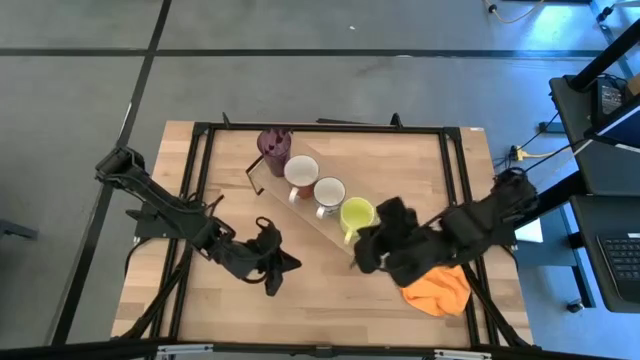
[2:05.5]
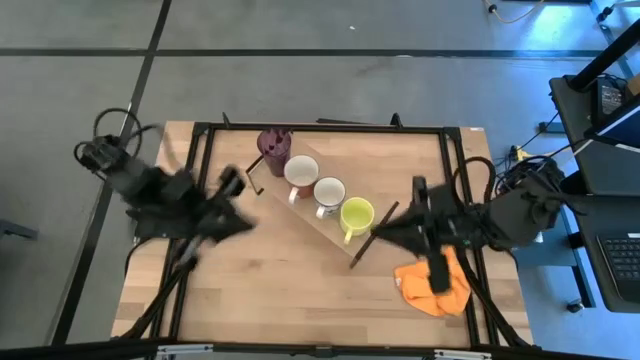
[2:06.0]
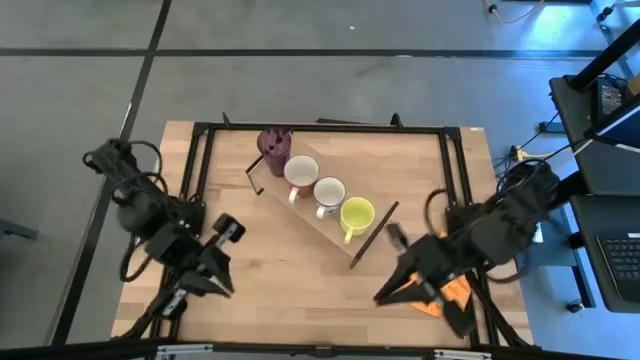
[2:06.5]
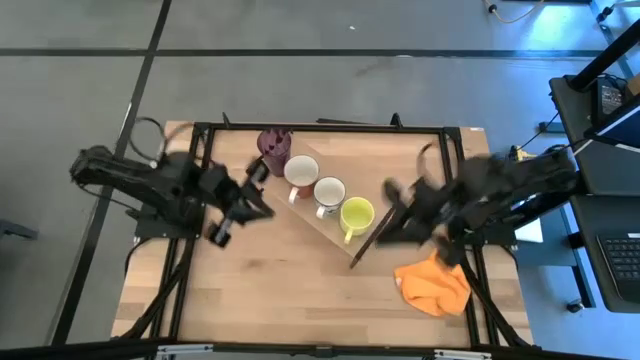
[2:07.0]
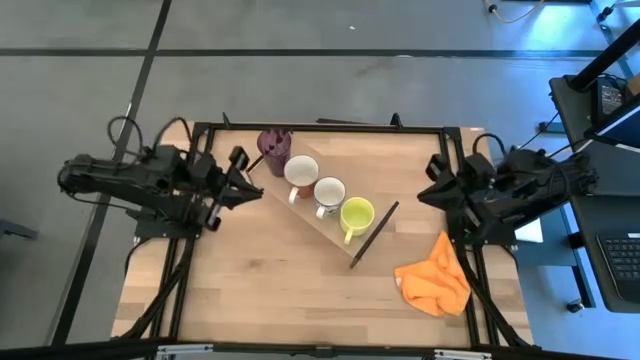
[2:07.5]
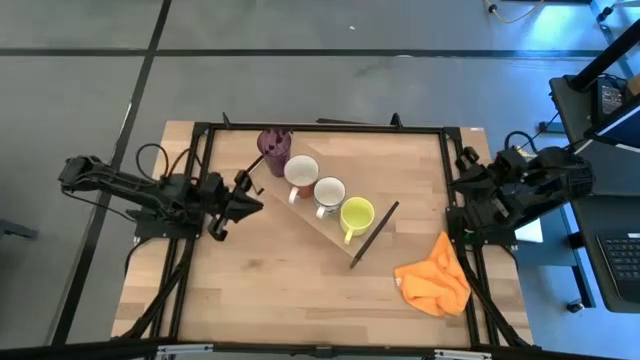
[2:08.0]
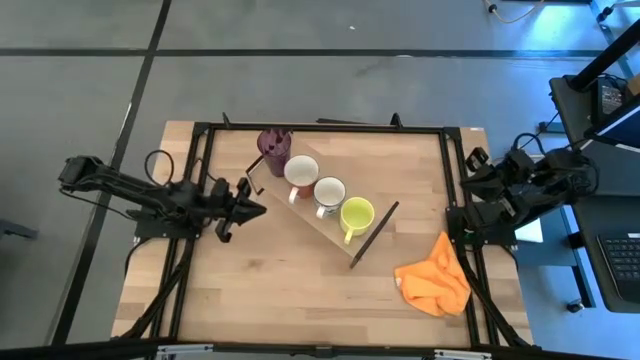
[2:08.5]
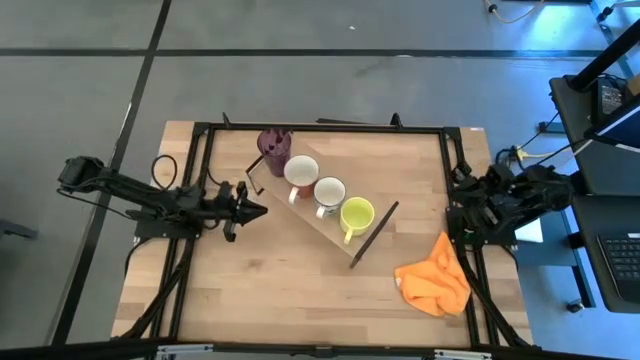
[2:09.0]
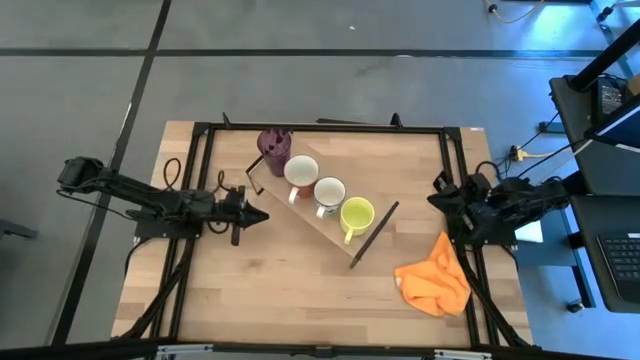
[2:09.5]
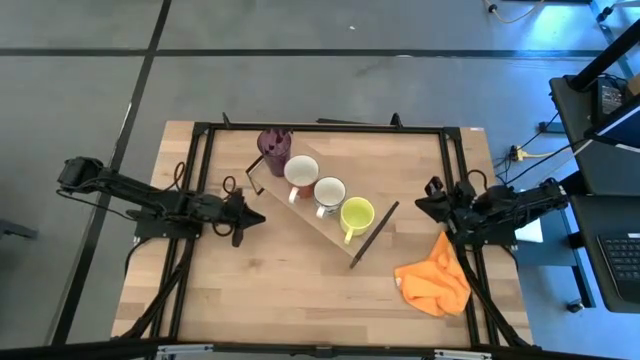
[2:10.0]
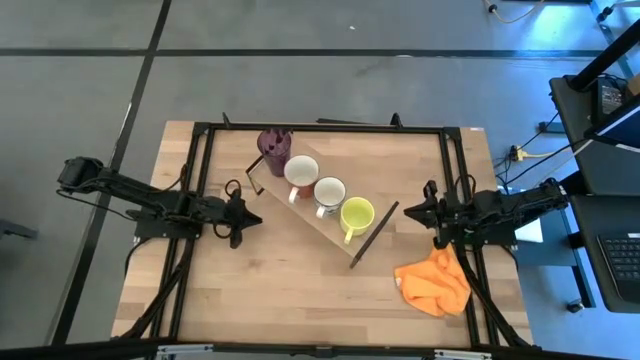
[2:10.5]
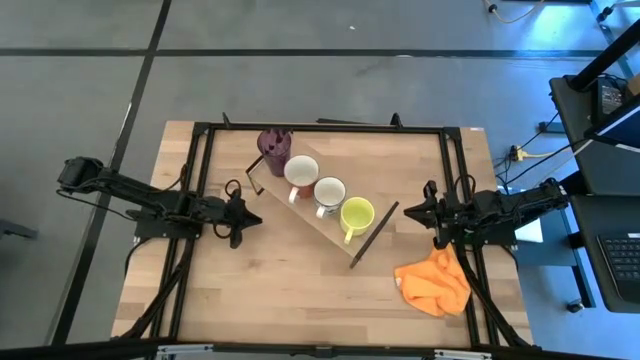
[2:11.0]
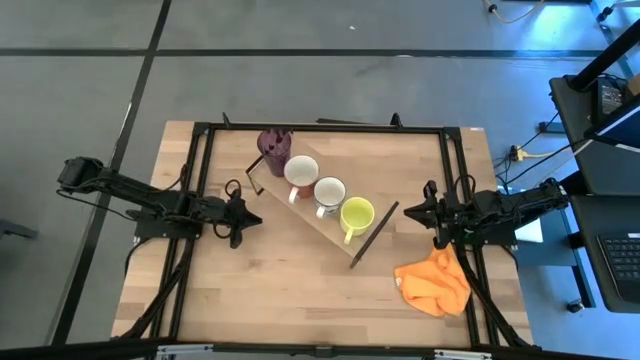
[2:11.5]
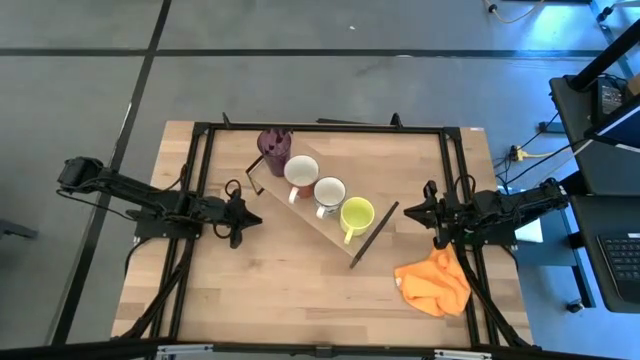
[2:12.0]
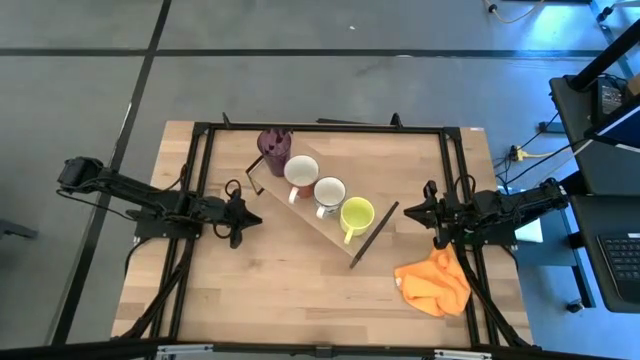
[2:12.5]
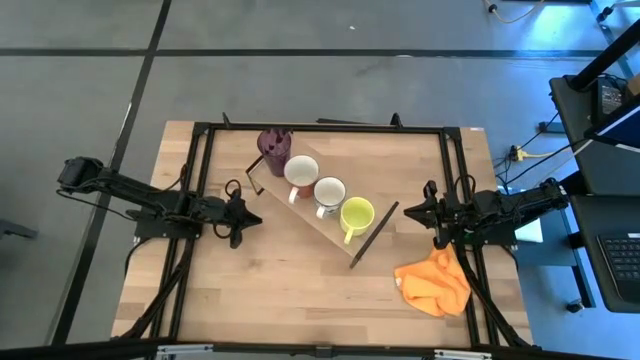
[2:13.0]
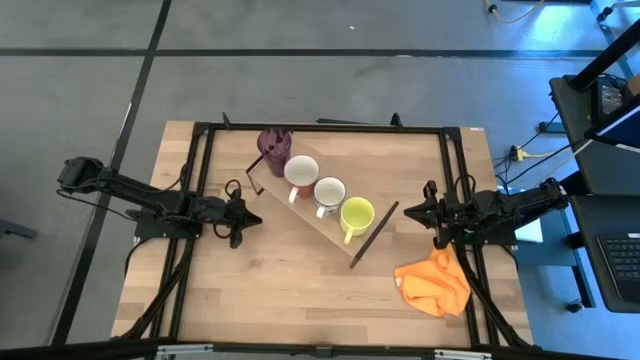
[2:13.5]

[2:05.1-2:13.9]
Task: Stack small to large cups/mugs on shelf
Return to Home Position

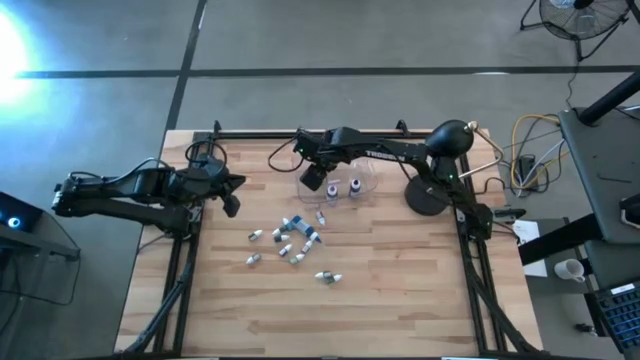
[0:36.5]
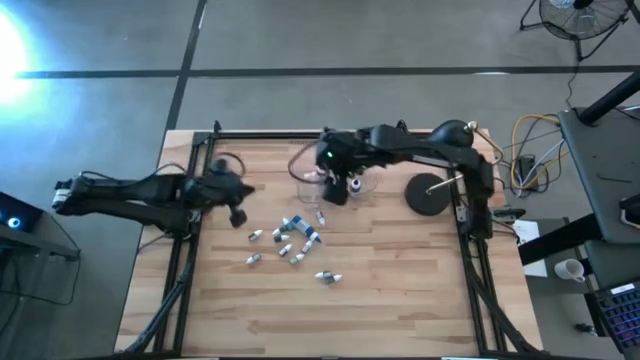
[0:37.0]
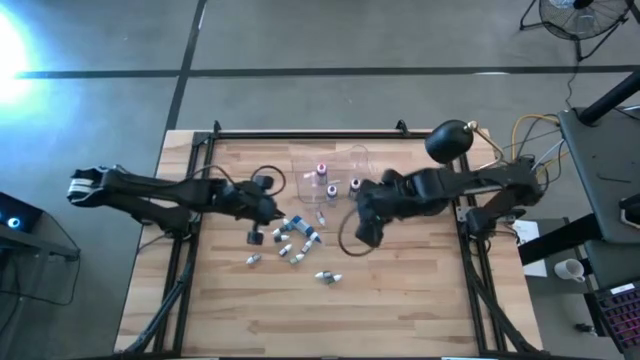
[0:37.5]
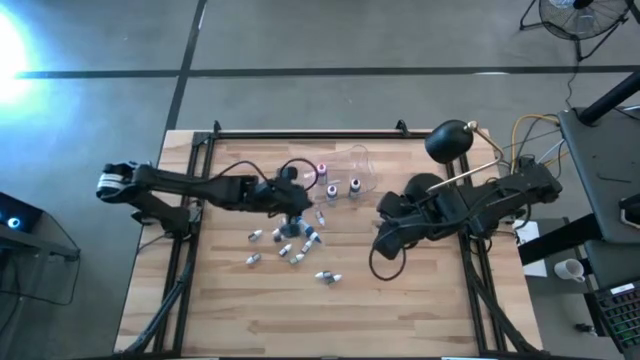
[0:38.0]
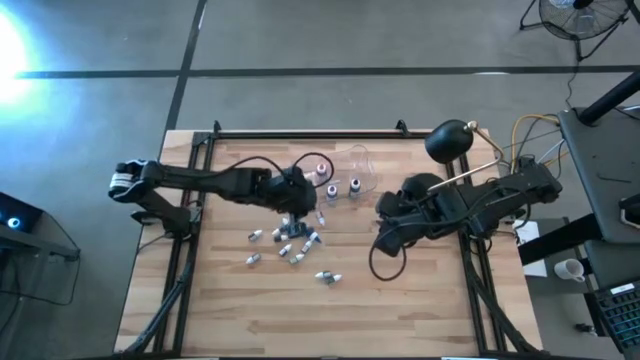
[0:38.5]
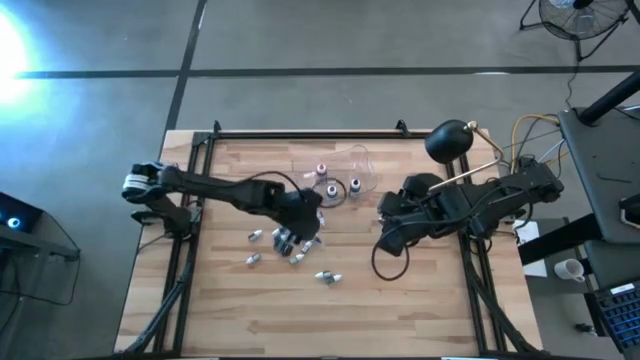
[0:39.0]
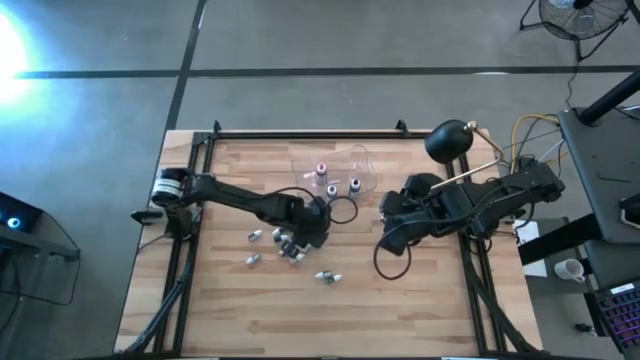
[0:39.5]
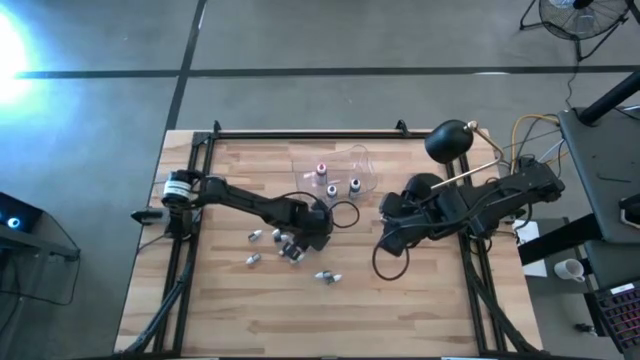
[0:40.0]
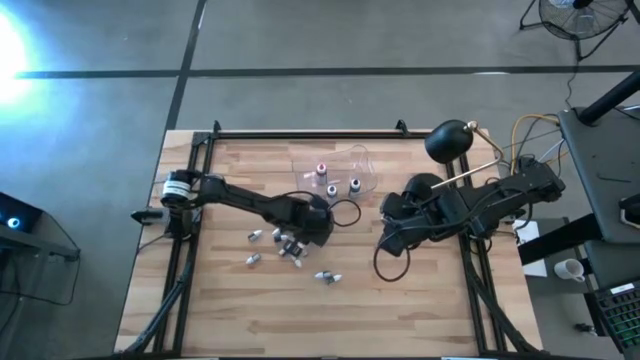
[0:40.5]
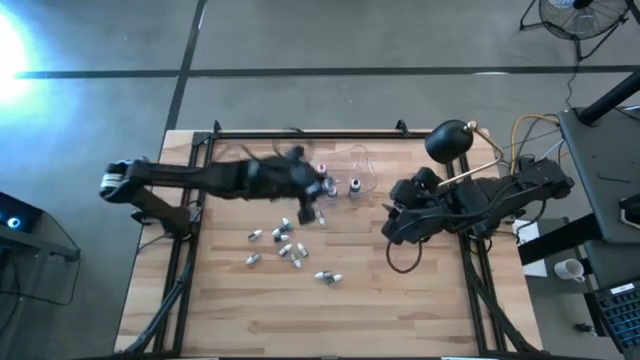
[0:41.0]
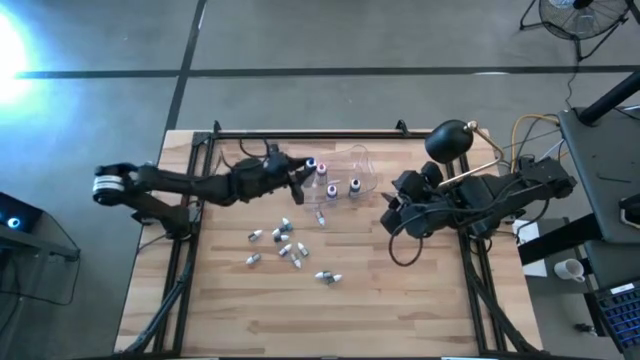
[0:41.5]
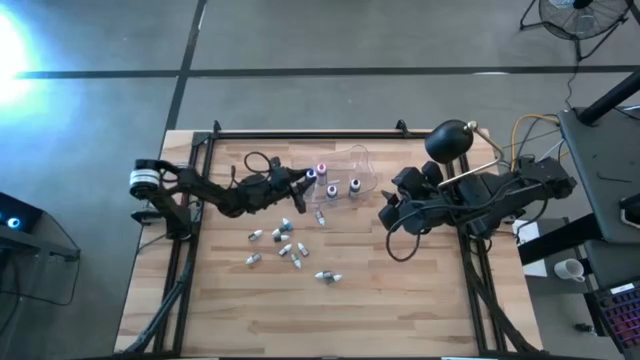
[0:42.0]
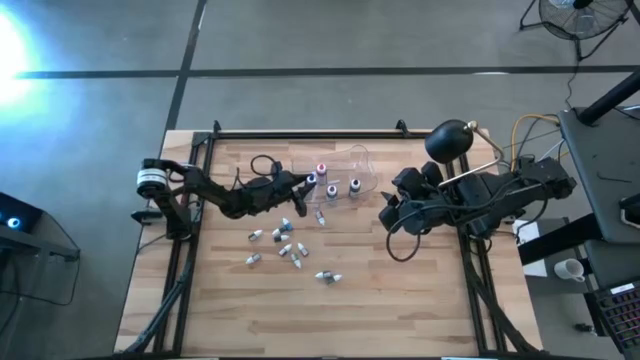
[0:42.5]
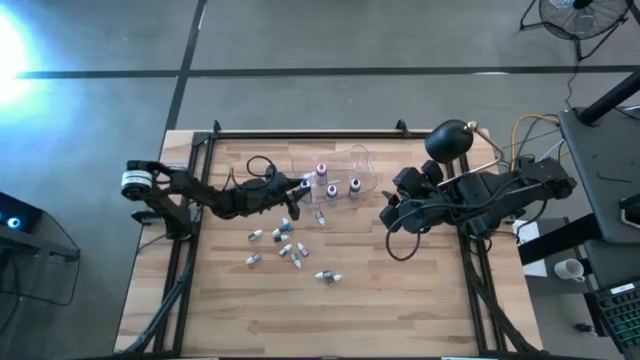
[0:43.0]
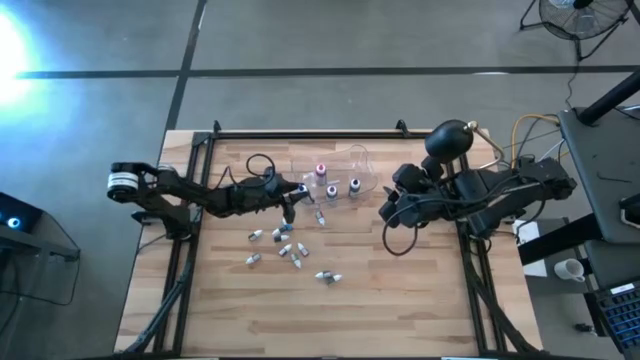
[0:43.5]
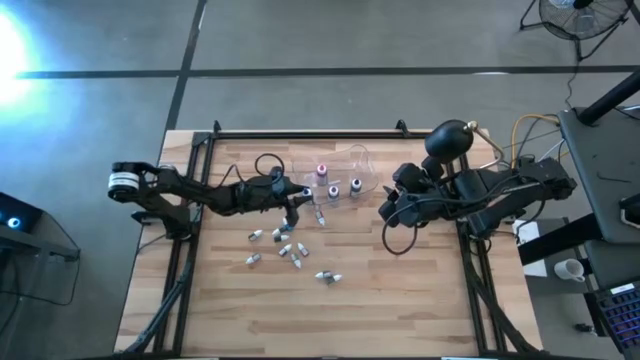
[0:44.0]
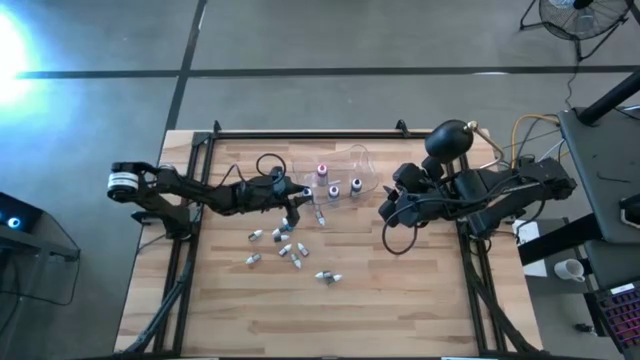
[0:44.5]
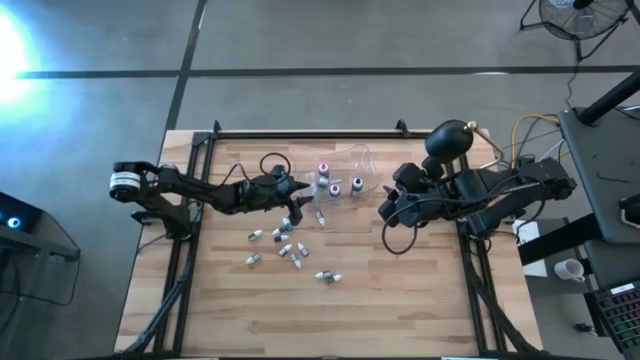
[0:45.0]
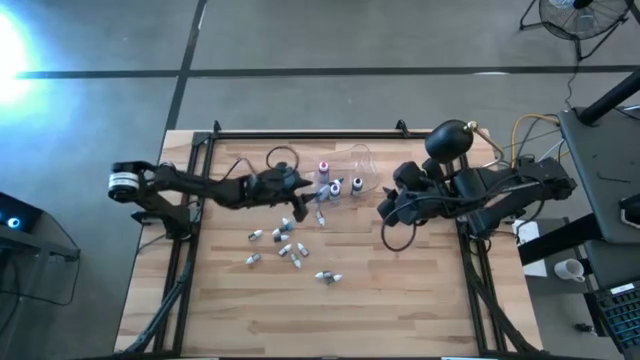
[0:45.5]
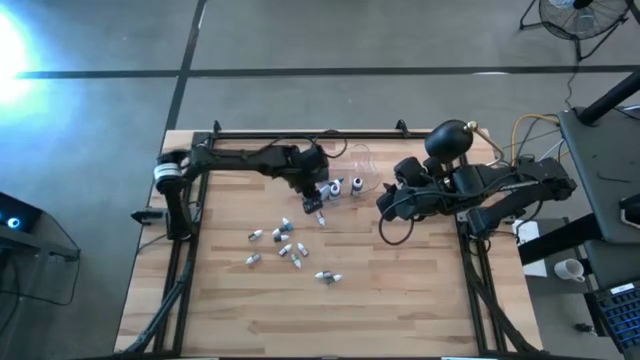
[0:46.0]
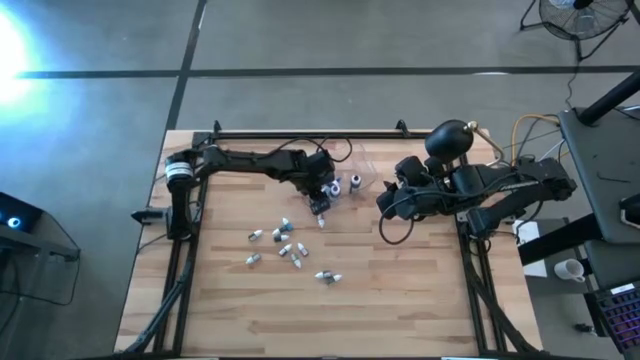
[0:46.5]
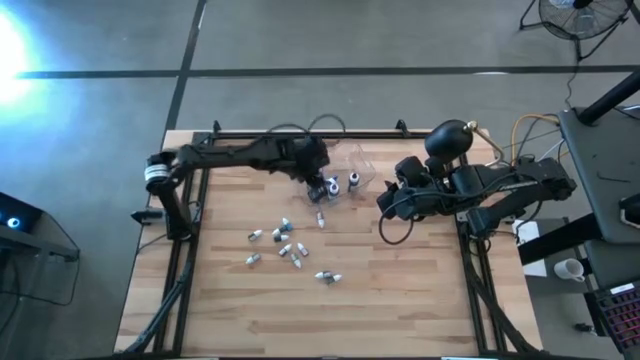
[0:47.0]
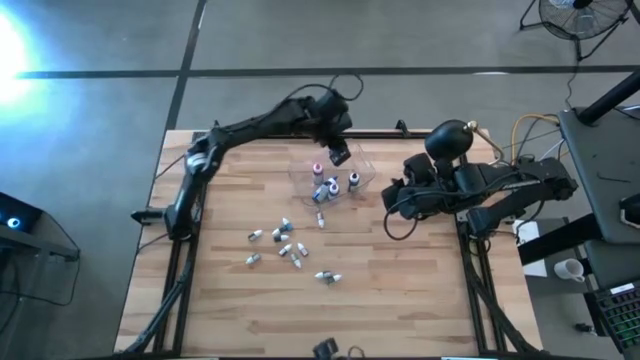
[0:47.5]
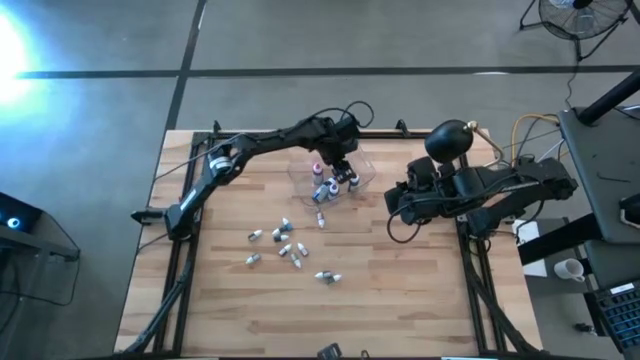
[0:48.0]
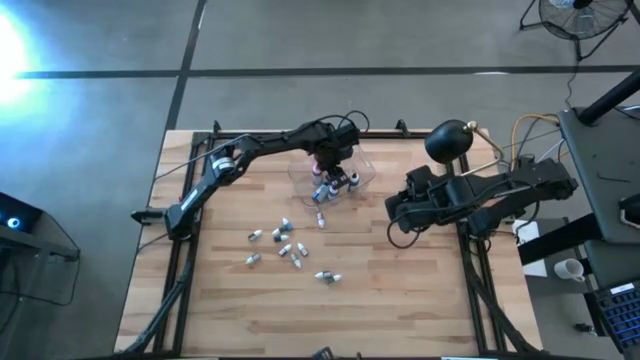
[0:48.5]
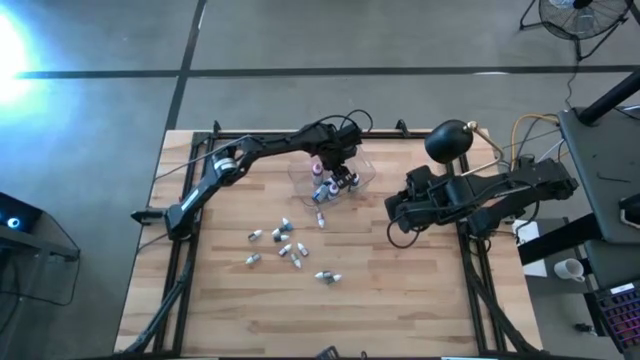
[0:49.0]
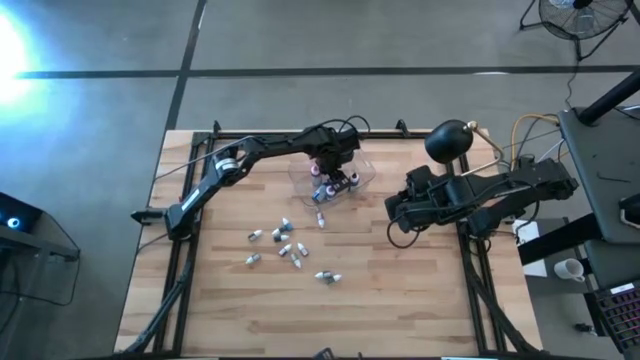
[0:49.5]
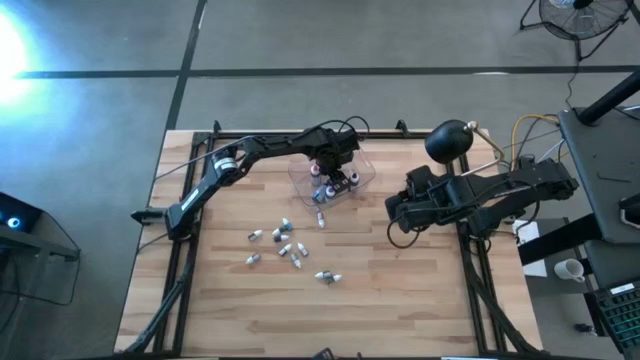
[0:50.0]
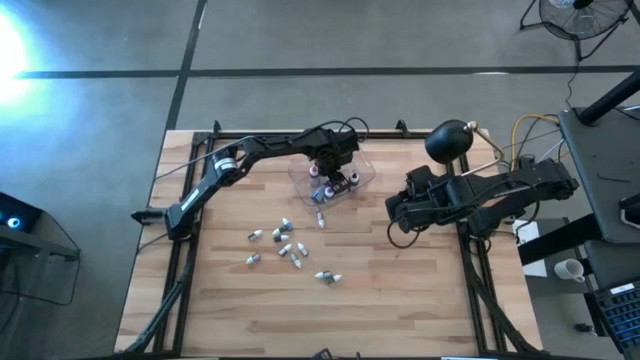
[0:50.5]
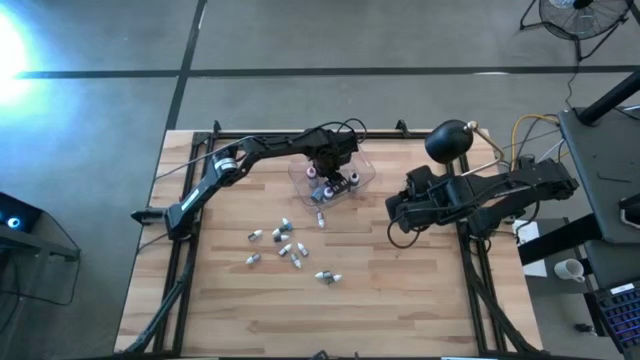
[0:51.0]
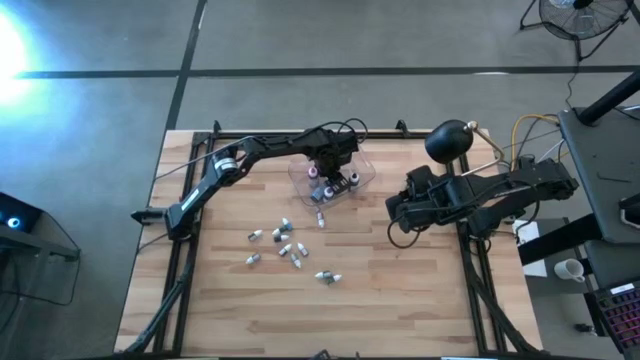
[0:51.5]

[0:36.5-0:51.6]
Task: Pick & Place food coloring
Put the large blue food coloring bottle into the transparent bin
